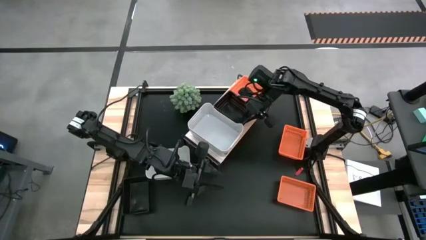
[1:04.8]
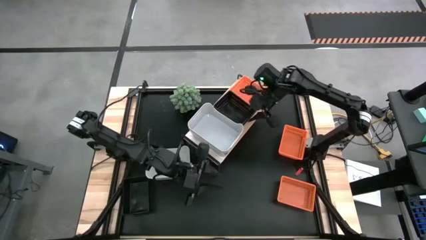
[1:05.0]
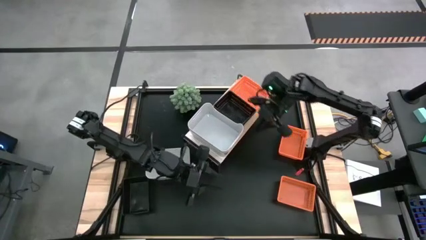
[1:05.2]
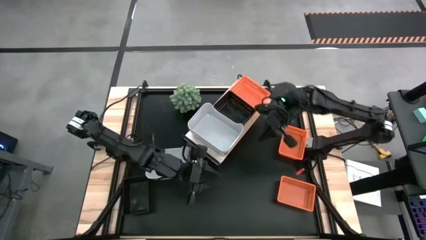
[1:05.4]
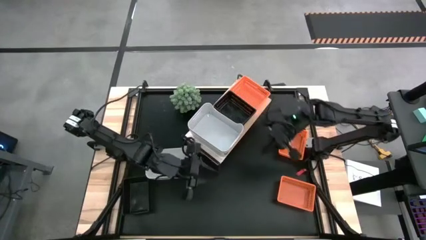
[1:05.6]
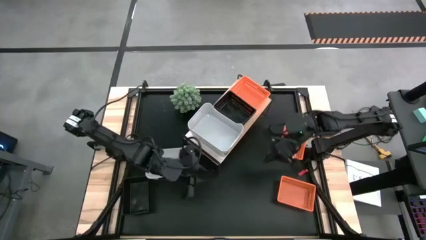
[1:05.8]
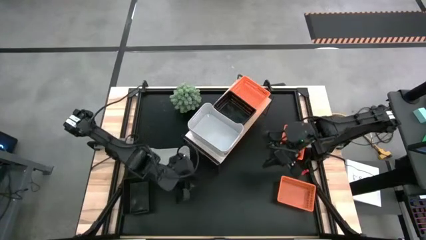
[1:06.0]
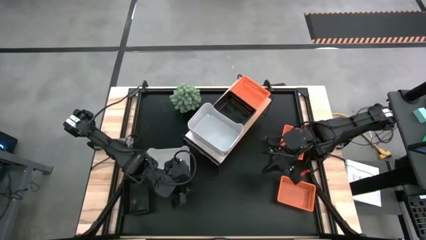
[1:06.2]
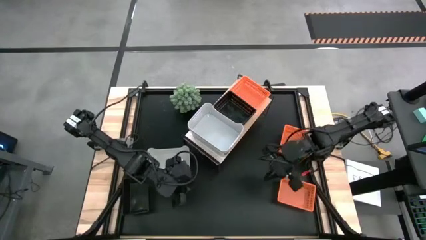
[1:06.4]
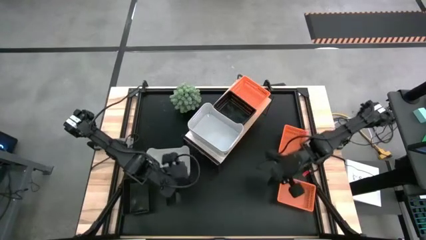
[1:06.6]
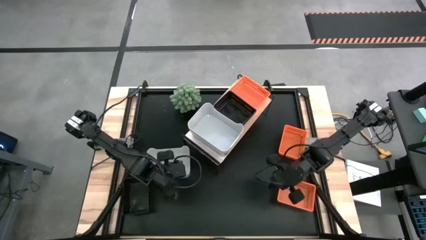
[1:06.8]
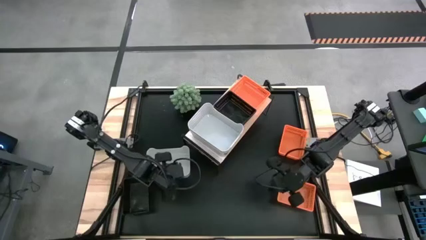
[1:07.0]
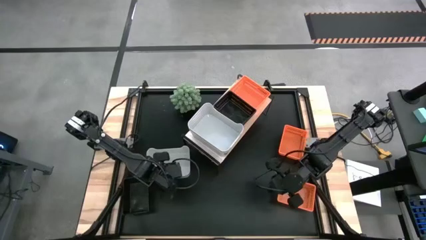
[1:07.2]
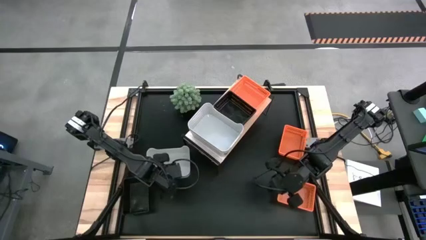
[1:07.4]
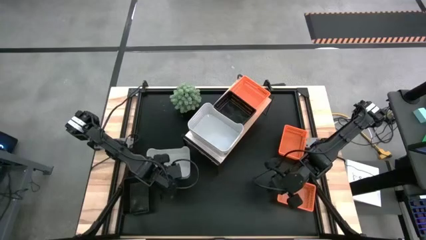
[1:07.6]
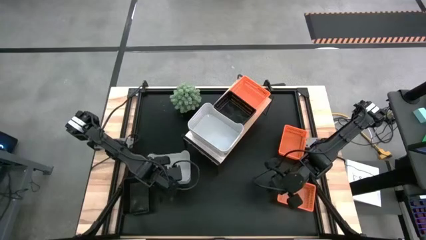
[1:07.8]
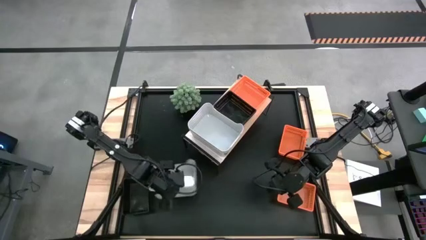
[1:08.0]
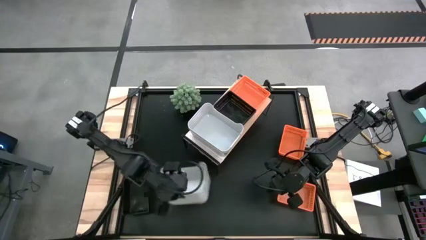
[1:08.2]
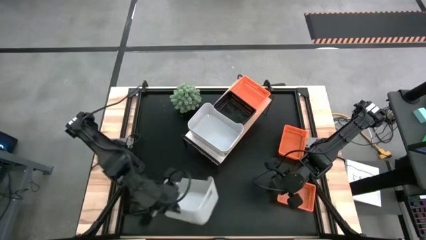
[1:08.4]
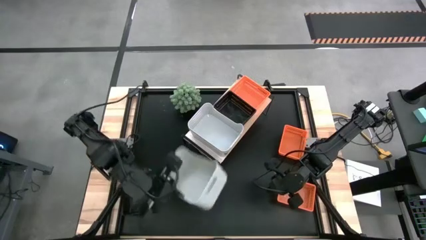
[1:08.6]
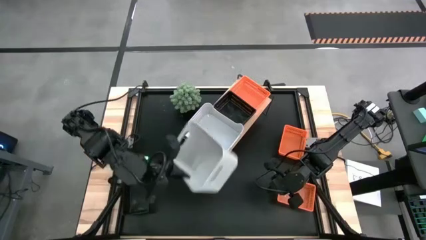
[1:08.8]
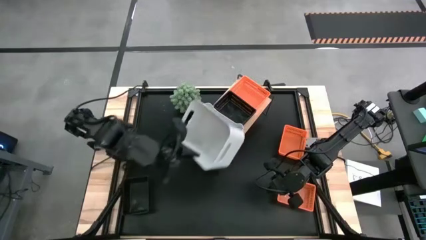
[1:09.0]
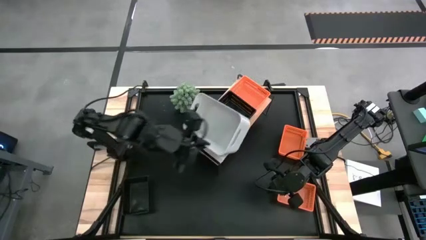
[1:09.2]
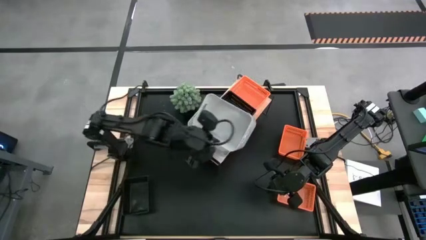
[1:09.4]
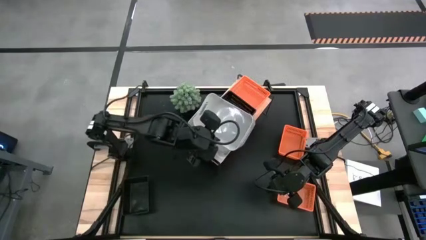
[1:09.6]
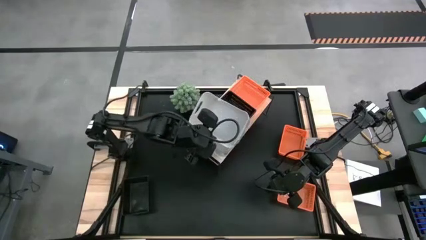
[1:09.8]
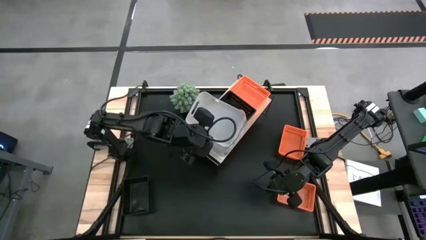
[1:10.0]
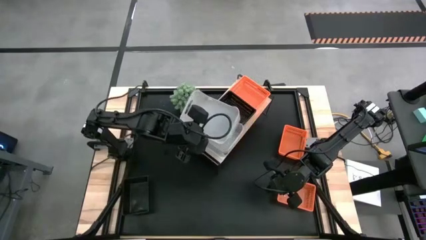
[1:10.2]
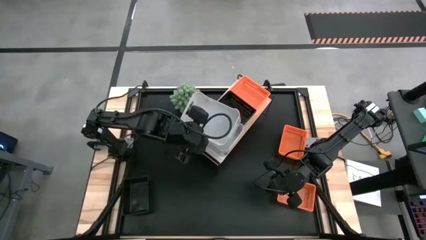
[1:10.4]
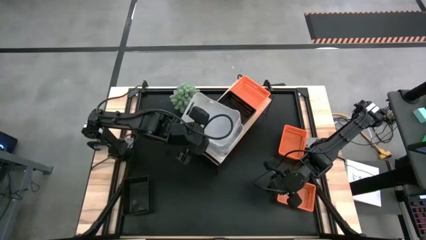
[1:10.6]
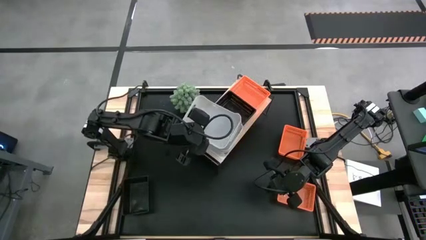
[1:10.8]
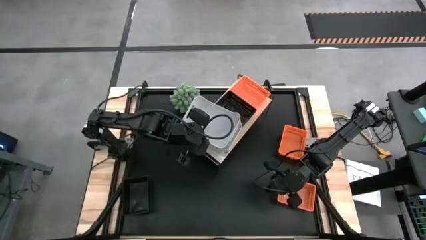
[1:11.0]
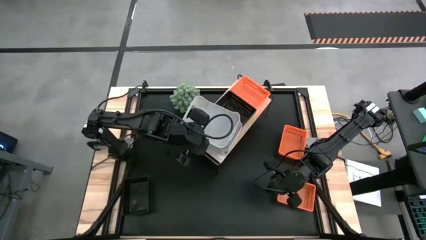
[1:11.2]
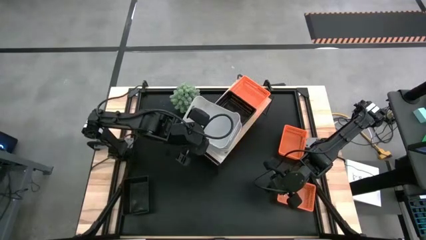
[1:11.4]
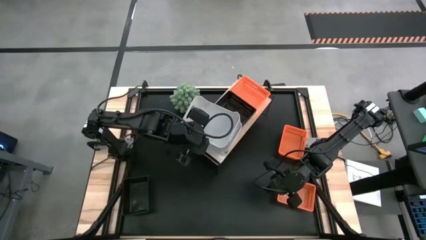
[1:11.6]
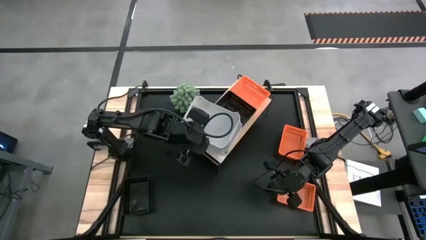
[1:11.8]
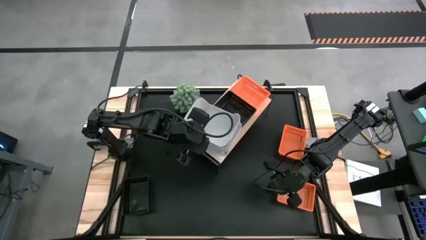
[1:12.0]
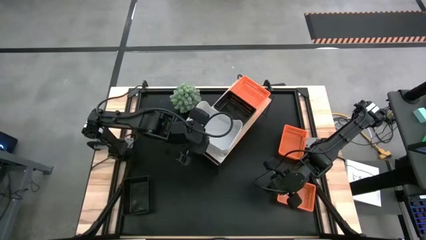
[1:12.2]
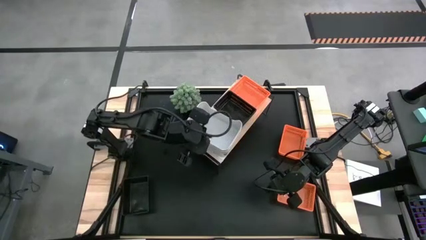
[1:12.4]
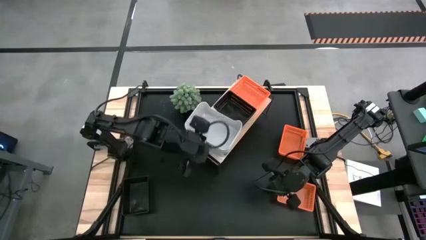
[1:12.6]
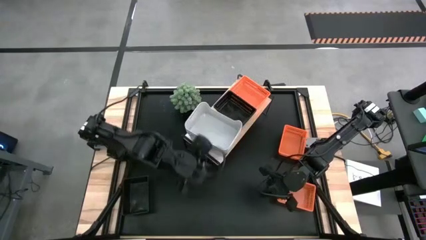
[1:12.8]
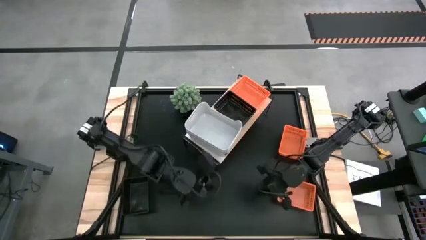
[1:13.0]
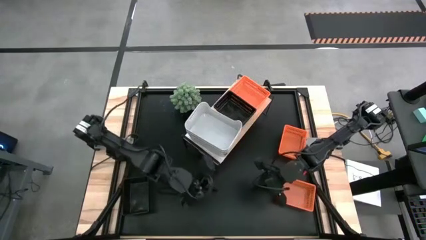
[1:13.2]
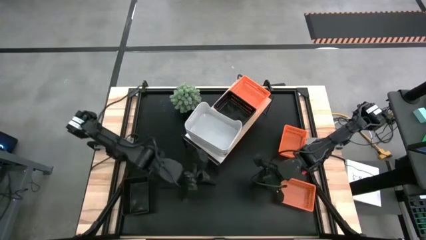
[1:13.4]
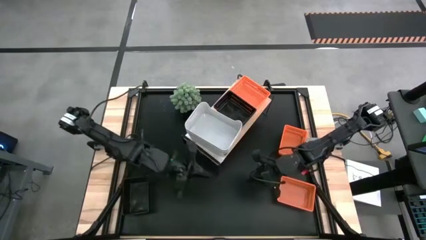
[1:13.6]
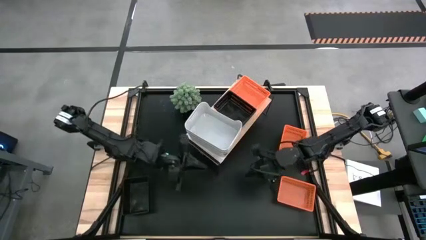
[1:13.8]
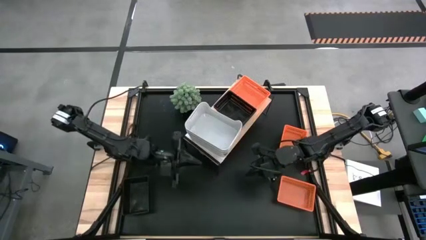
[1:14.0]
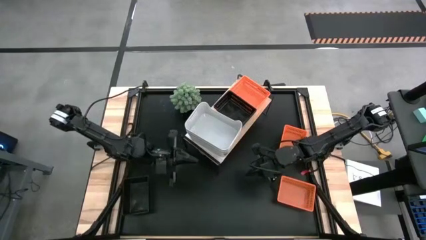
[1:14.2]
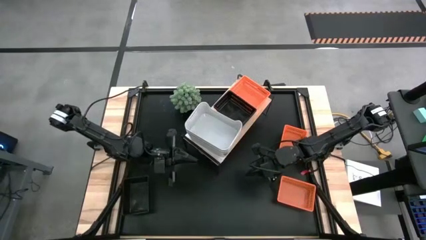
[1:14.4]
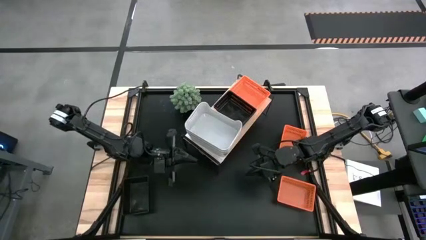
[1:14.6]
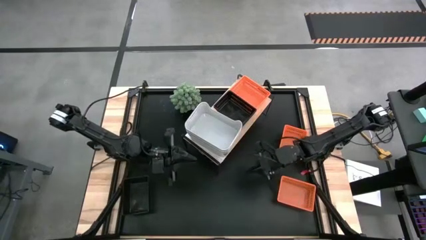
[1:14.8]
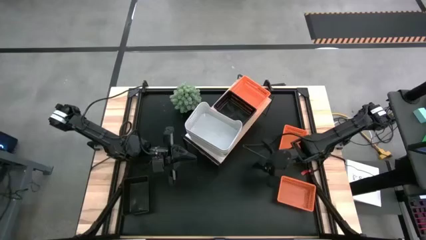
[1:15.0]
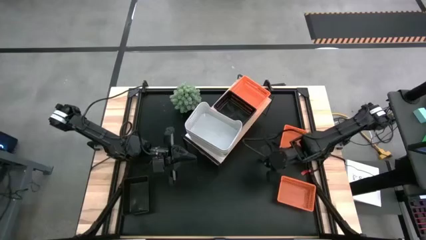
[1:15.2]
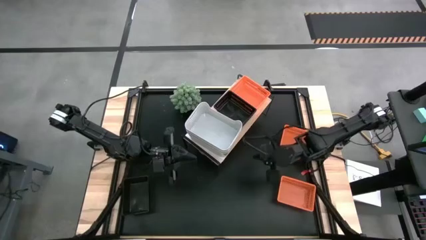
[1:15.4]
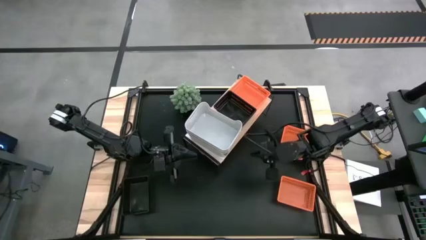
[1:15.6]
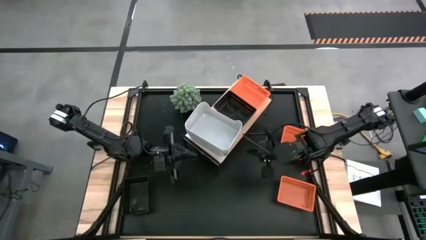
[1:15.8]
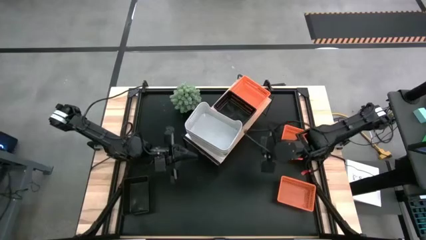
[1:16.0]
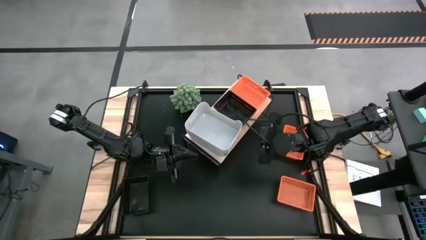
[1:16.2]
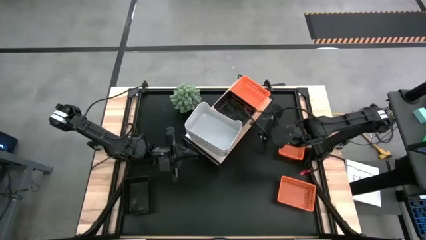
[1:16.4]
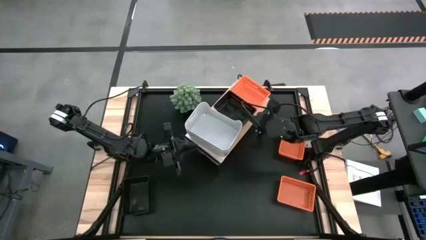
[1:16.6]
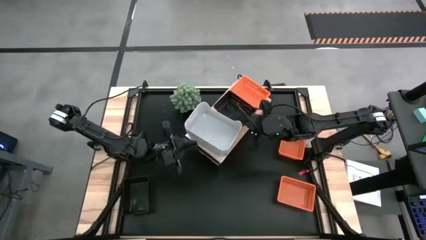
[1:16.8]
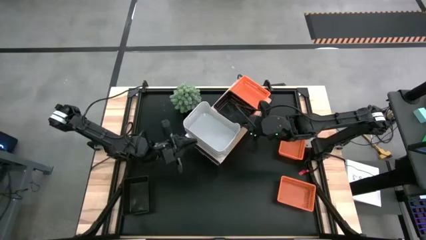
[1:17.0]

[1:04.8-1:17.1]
Task: Stack baskets on shelf by color
Stack the gray bin on top of the other gray bin on the shelf
